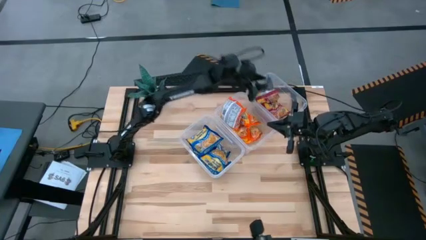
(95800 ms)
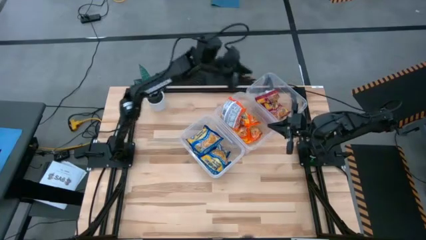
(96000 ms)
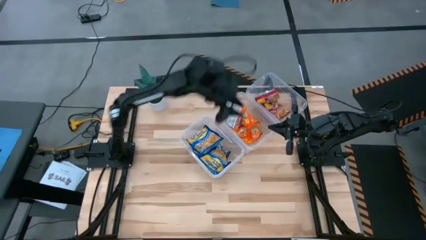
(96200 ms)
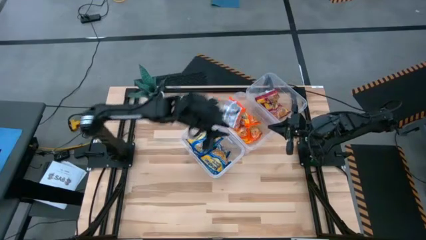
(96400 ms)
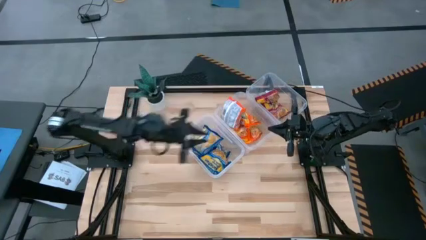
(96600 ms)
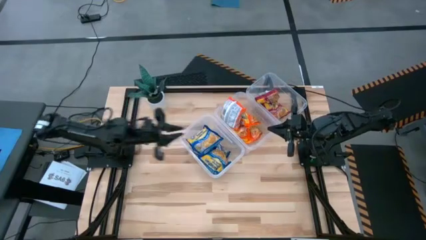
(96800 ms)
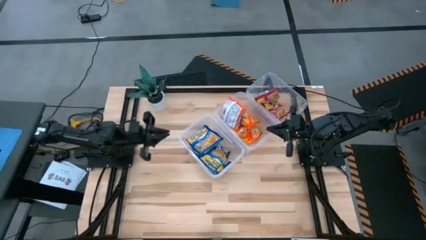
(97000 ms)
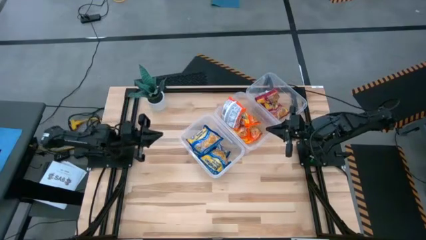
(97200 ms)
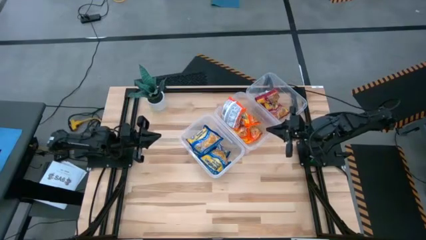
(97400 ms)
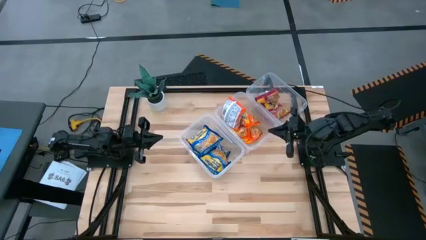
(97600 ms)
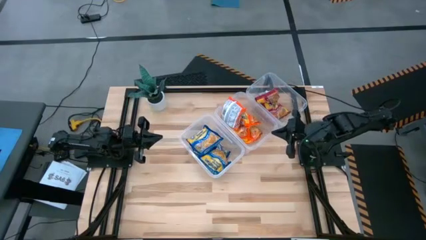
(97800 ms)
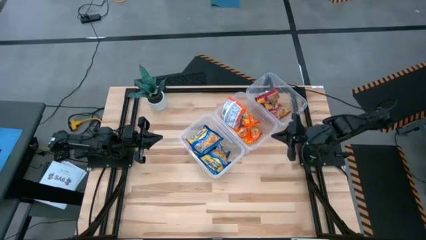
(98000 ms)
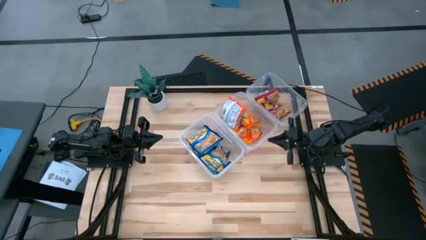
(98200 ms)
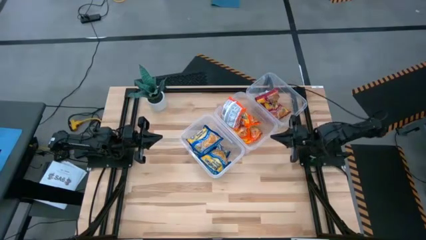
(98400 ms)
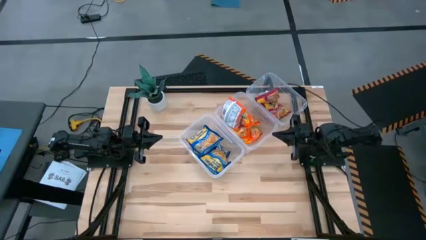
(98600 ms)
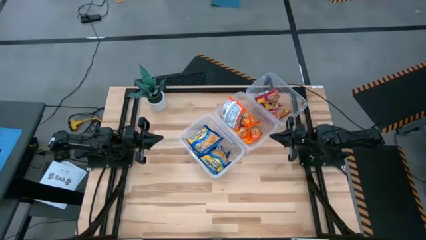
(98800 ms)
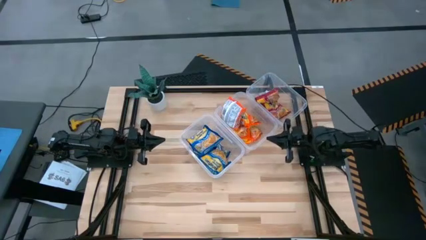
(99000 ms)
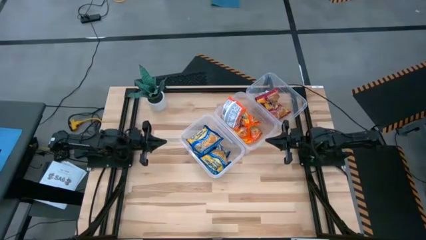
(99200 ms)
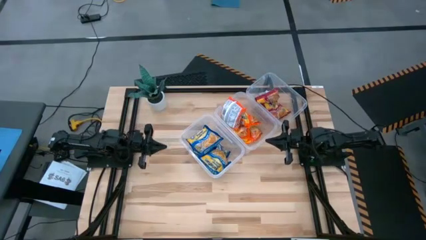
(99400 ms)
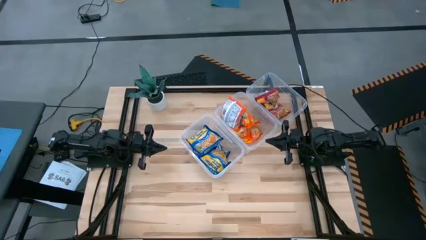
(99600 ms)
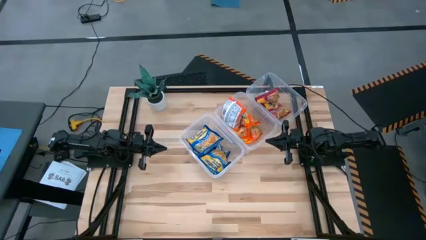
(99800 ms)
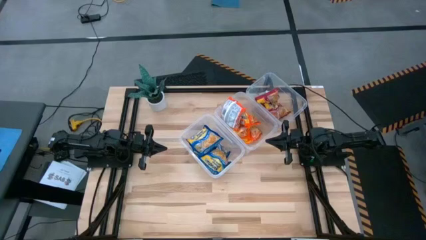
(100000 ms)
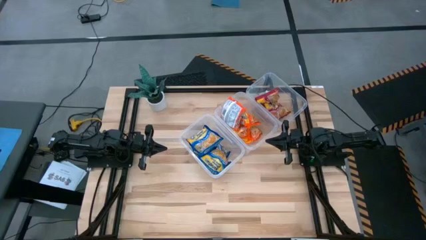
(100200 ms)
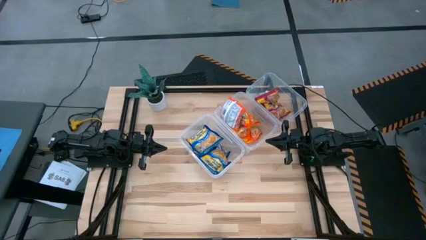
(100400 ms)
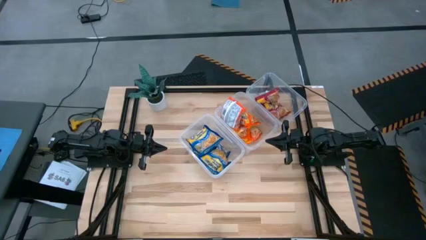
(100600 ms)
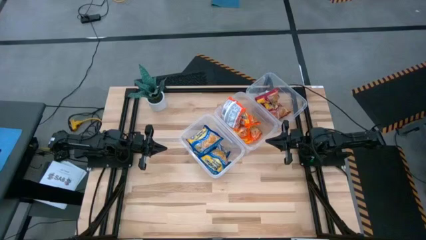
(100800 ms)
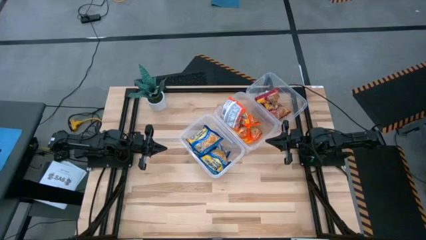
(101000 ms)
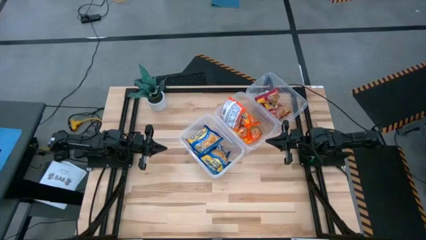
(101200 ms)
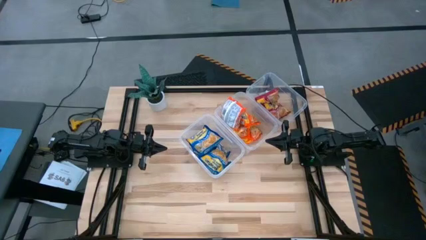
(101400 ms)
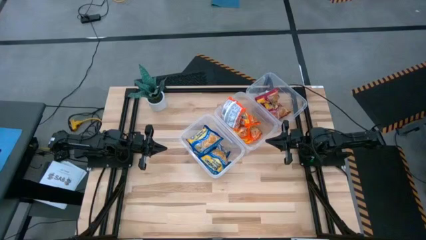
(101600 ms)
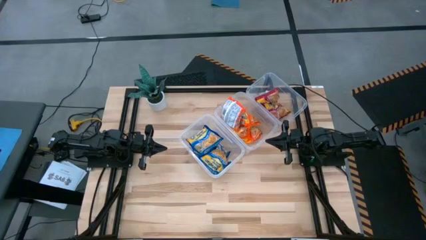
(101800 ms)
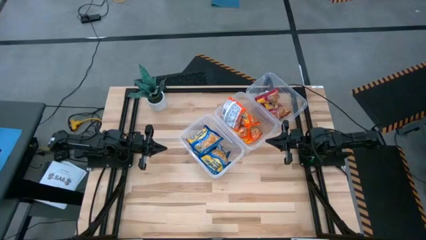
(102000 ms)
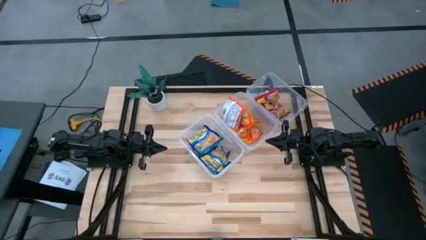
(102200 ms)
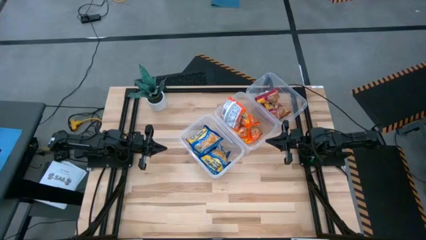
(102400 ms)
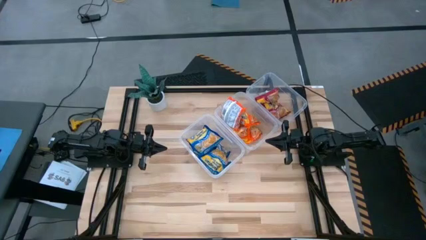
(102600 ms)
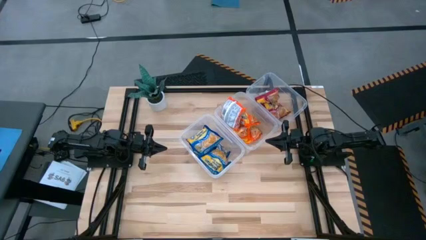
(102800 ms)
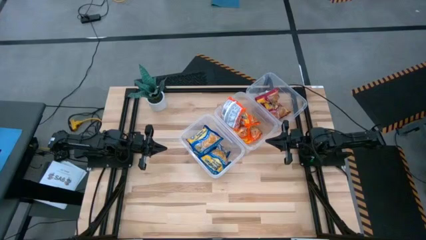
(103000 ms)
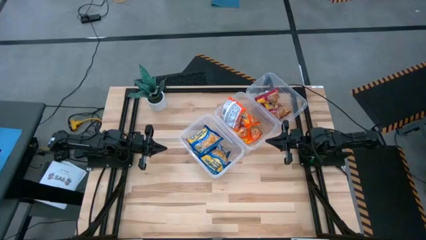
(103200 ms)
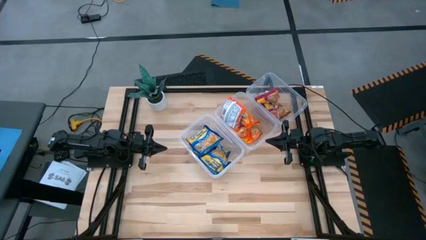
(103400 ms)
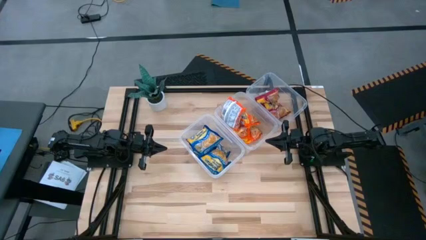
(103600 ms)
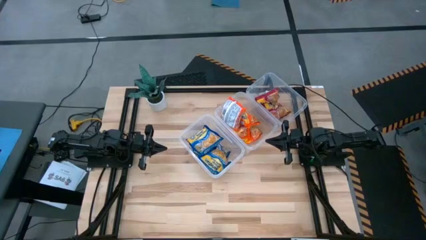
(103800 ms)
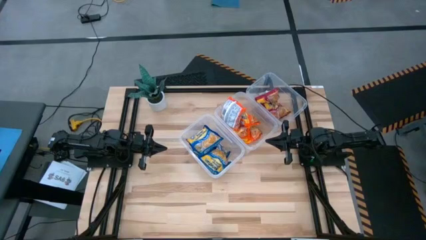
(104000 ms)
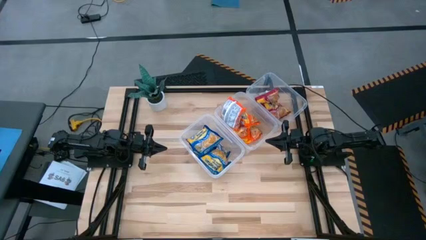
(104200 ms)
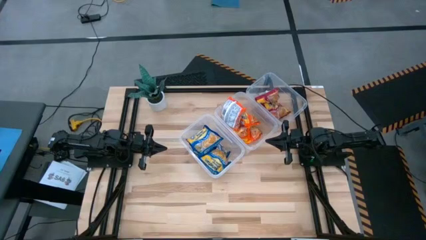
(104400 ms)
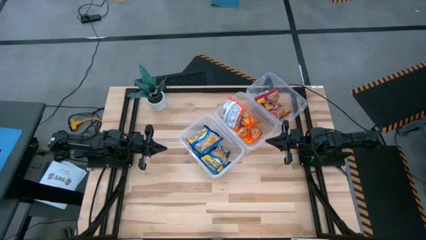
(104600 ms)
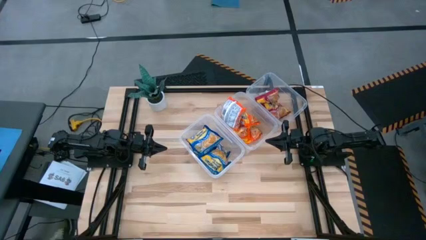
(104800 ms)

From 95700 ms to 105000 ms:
Task: Sort Maruchan noodles
Return to Home Position

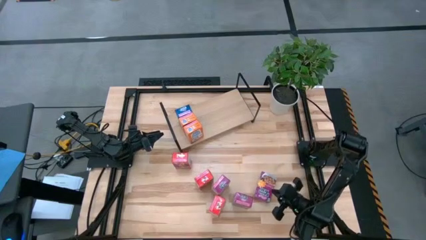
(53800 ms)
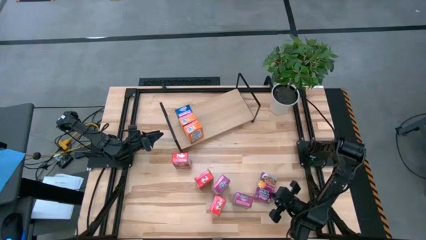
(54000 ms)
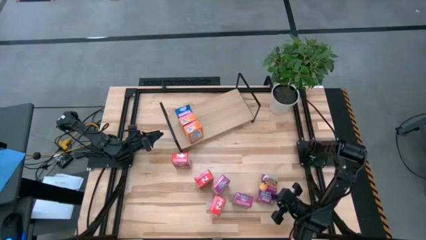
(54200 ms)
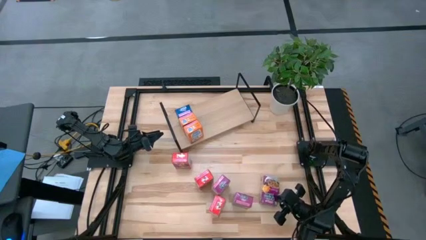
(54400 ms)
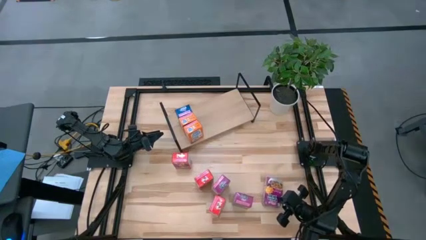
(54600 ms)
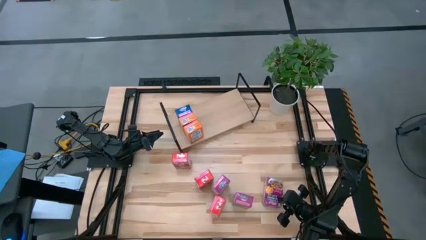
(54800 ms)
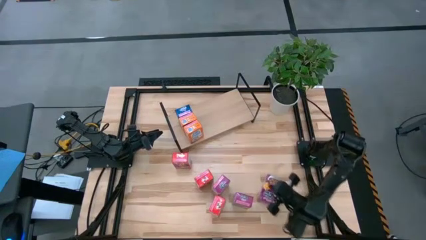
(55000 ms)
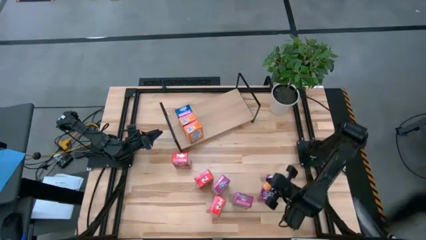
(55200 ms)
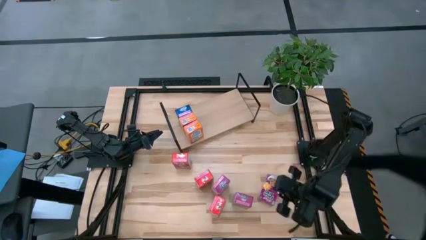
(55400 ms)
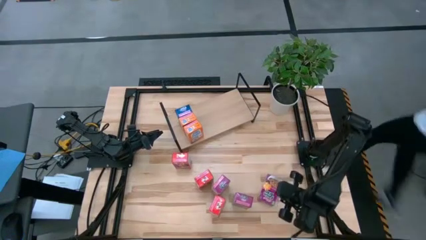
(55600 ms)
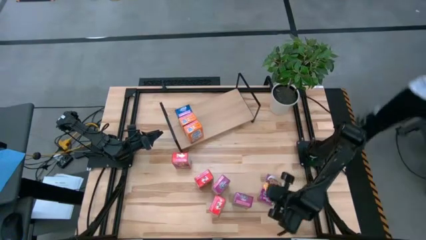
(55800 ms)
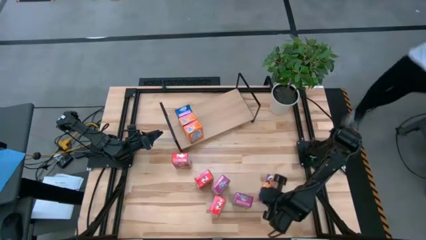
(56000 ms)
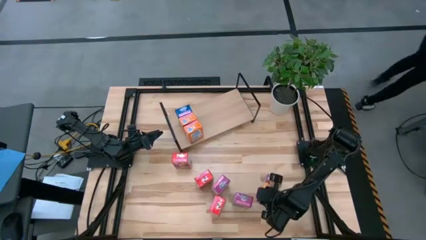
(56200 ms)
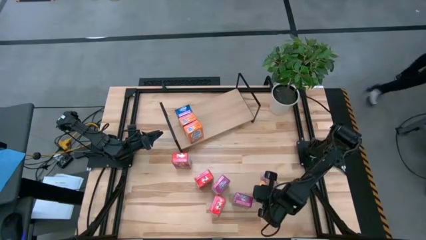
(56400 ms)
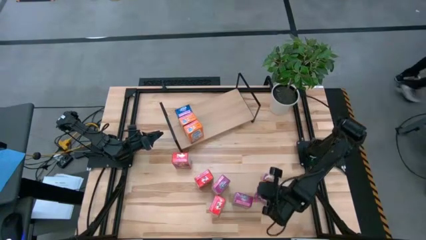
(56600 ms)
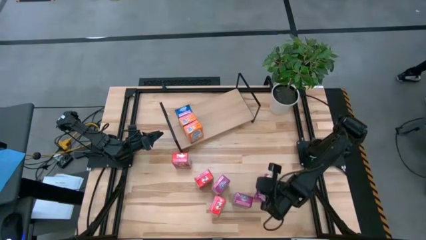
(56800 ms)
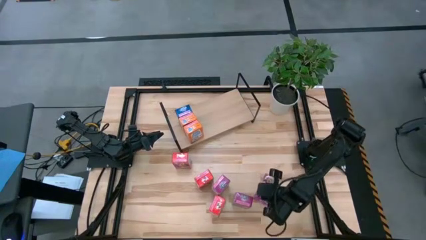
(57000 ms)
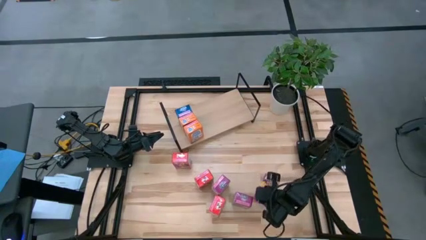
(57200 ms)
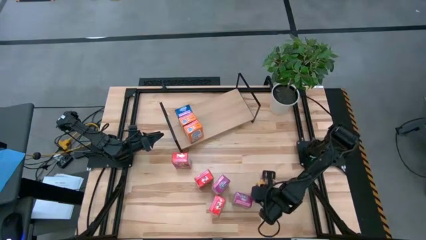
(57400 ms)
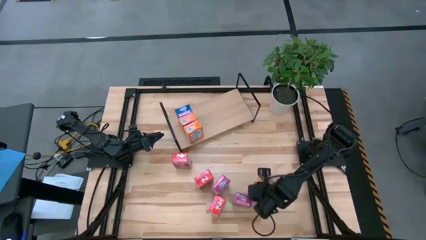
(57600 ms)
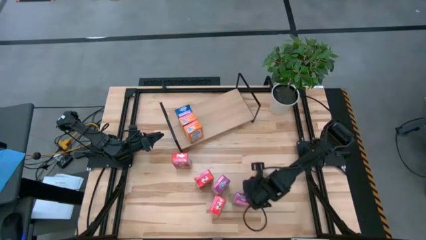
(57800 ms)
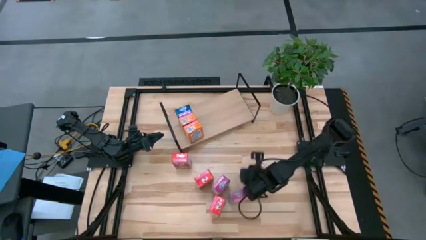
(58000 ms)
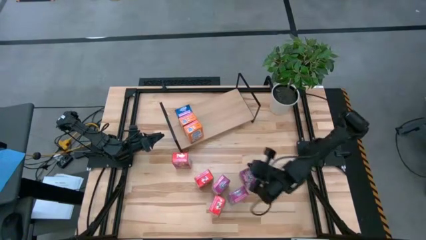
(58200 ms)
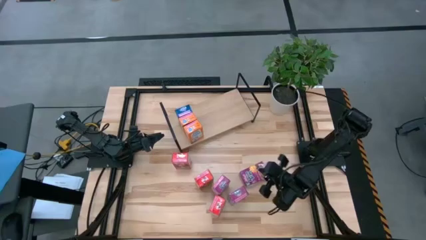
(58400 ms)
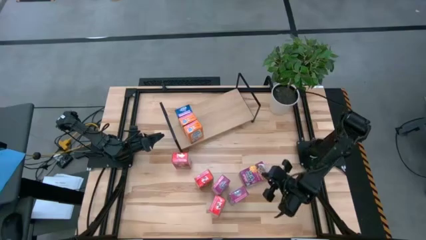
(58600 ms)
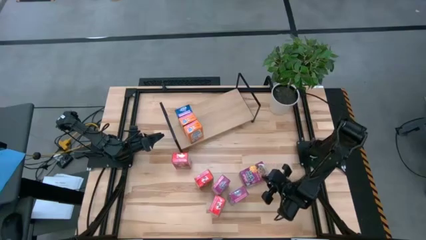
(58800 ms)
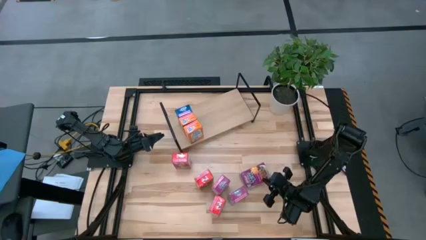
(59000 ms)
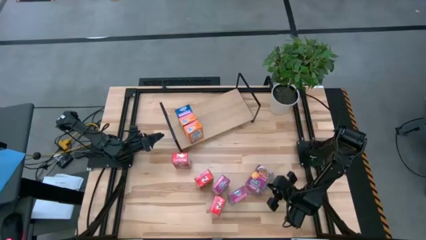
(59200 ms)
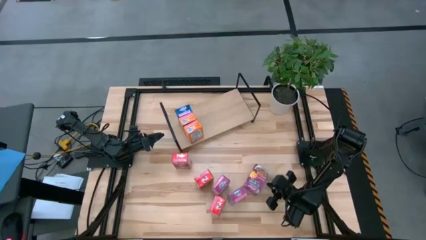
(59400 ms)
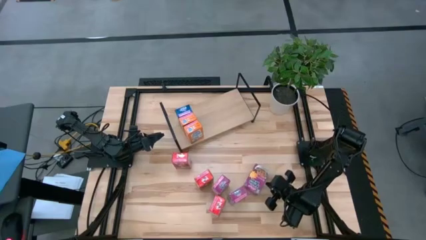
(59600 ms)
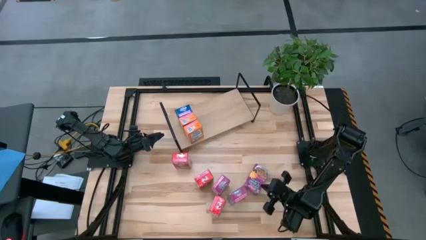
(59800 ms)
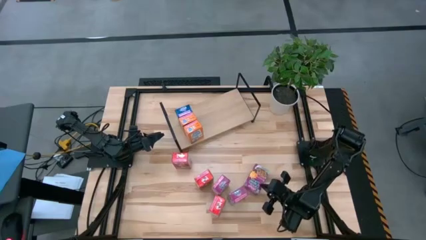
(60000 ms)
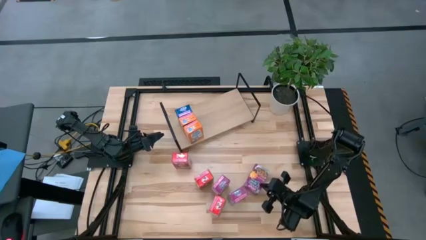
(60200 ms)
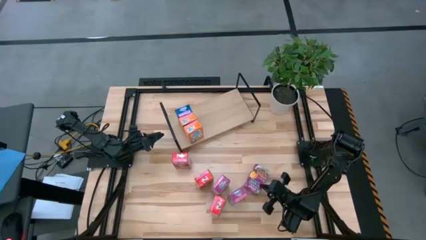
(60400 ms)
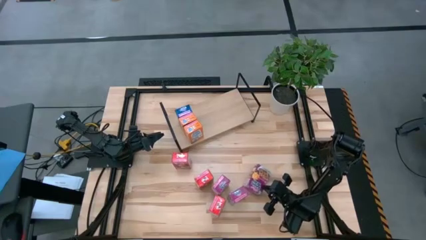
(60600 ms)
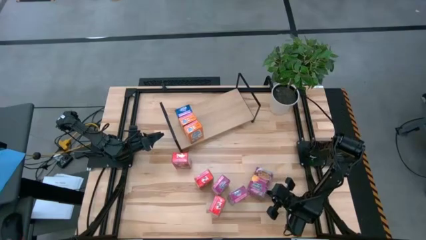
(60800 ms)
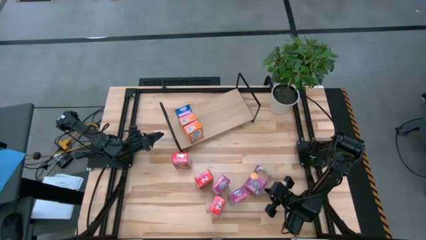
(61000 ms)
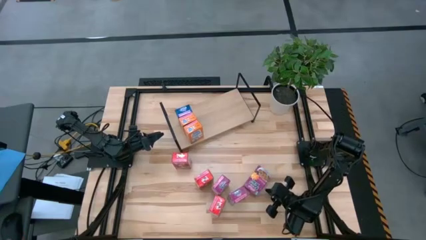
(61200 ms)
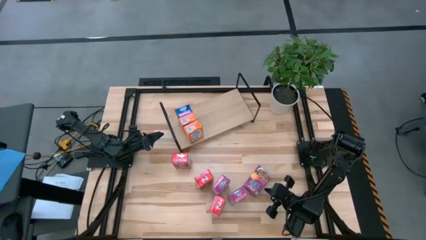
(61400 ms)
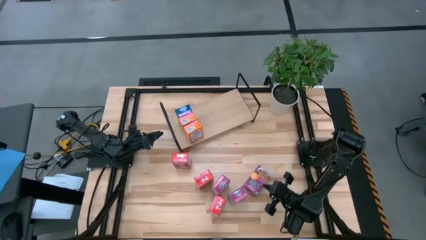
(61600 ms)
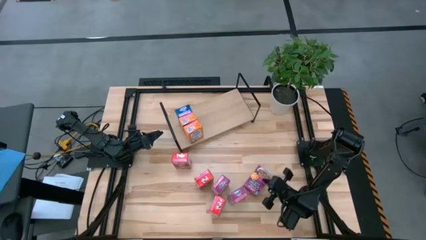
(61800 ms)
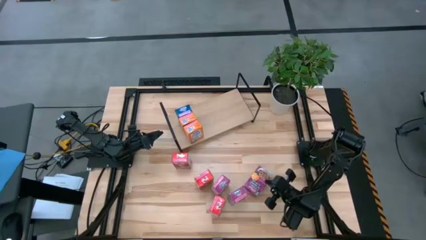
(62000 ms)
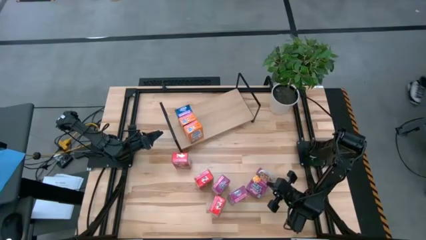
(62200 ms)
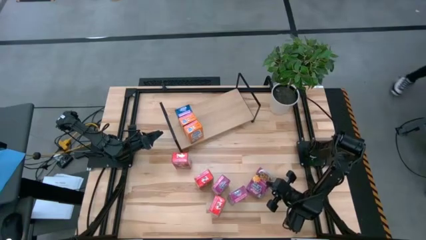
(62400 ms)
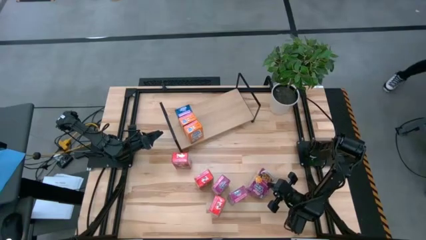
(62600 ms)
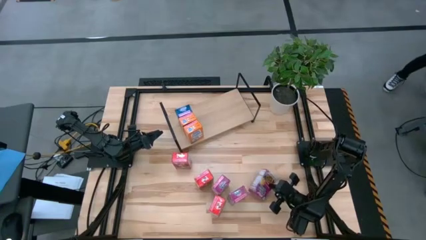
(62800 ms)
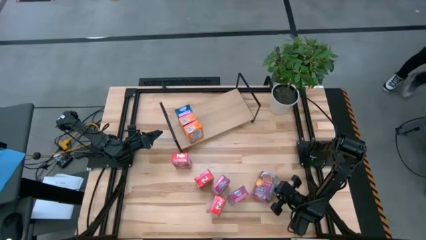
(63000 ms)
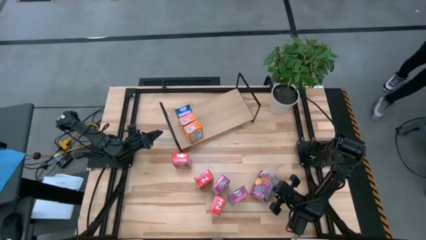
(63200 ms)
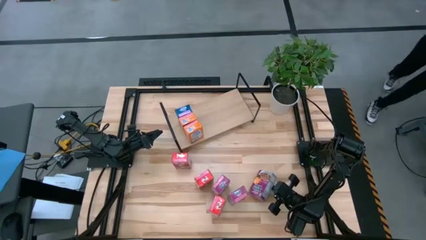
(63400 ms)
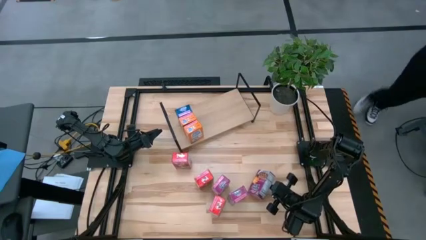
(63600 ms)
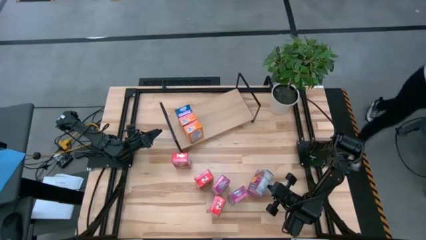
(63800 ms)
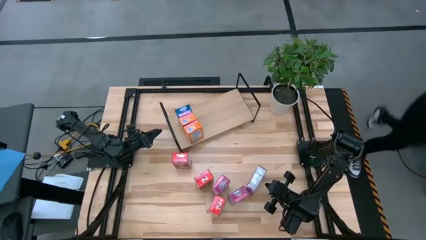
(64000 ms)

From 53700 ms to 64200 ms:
Task: Stack cereal on shelf
Put the top purple cereal box on the shelf
